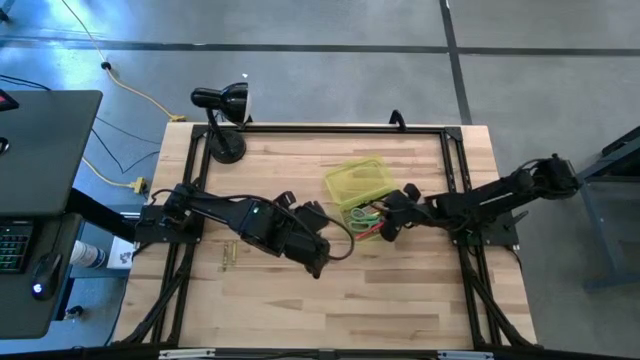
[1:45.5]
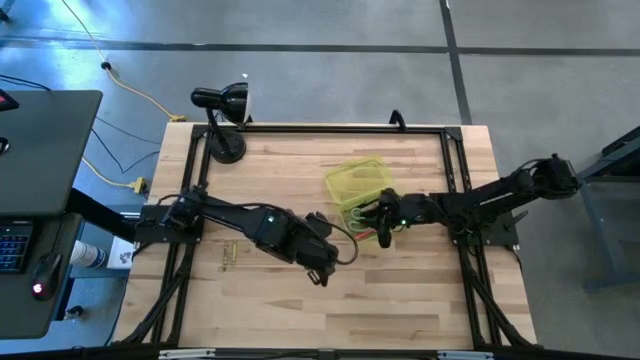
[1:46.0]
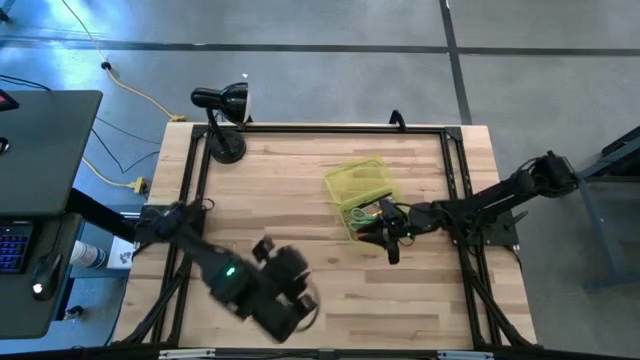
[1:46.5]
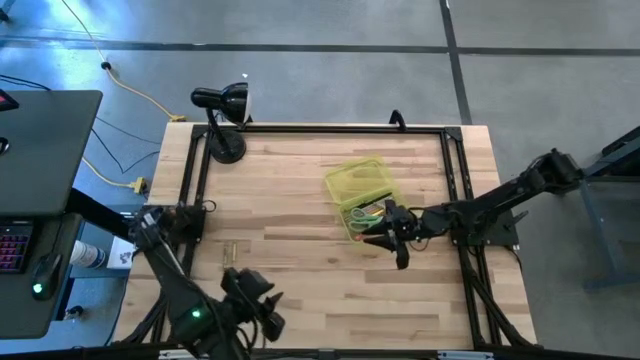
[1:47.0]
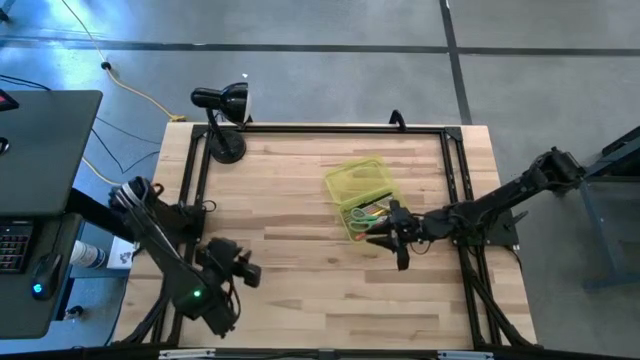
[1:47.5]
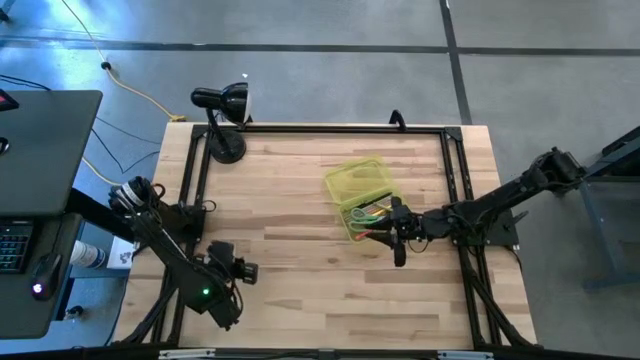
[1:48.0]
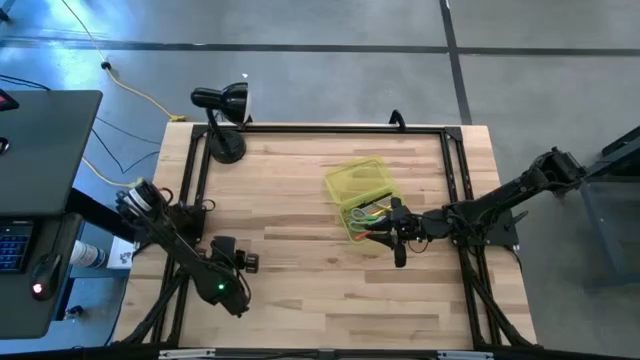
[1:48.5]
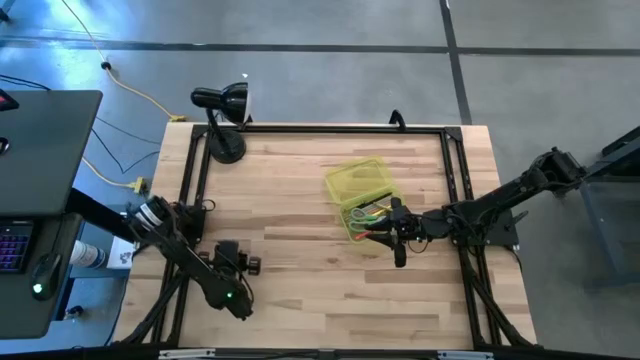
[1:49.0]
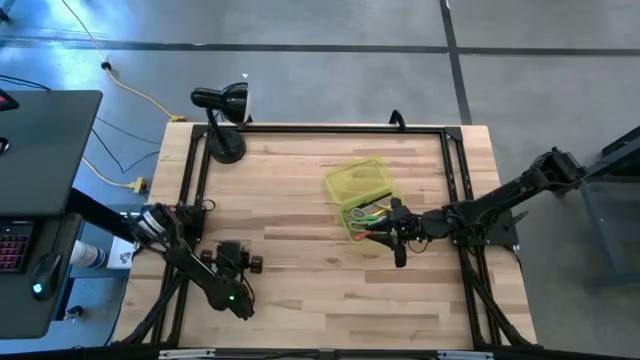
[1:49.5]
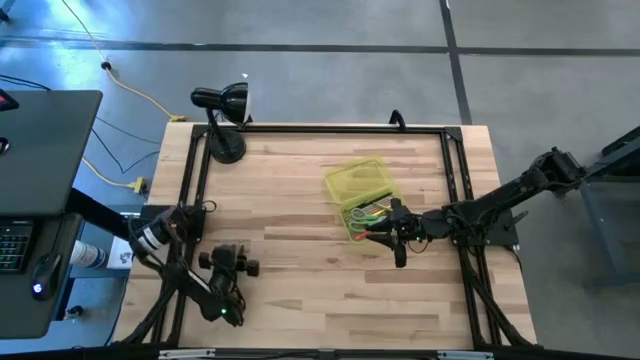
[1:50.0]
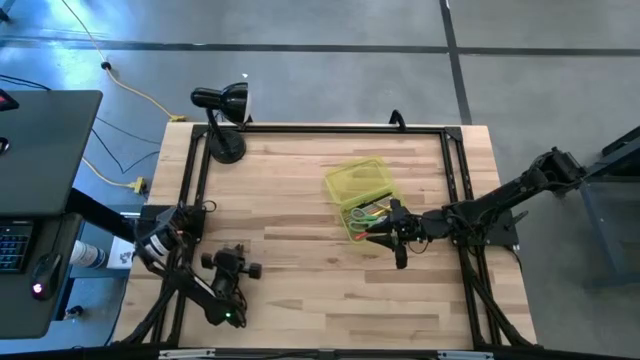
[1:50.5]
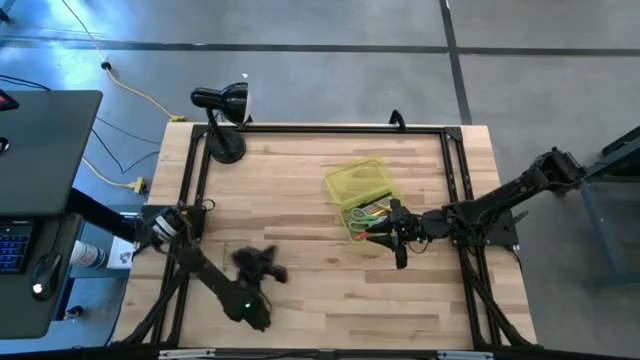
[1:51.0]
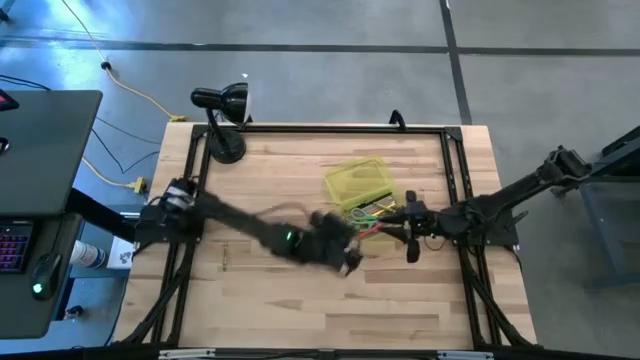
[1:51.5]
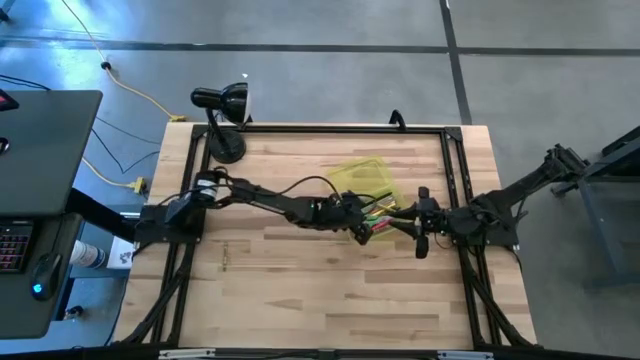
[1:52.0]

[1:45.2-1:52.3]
Task: Pick & place school supplies into a supply box
Put the green crayon into the yellow supply box

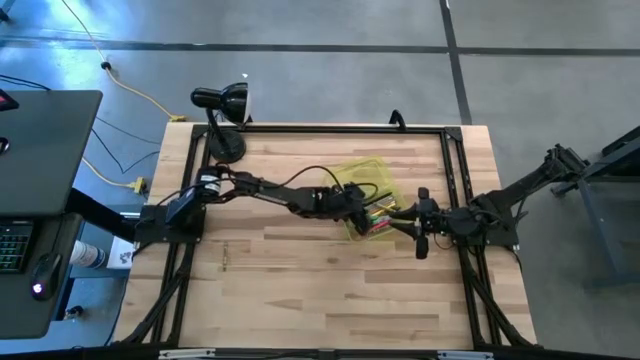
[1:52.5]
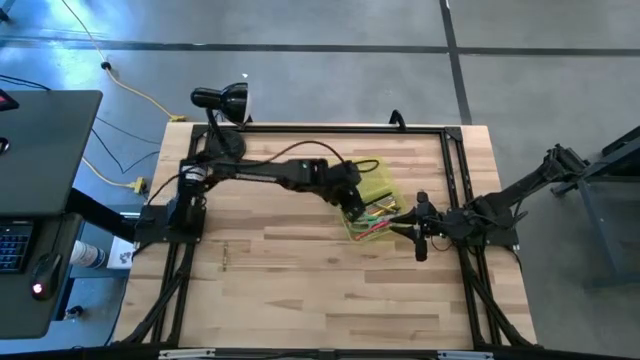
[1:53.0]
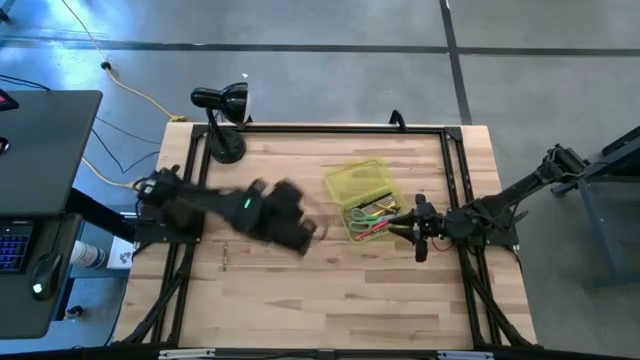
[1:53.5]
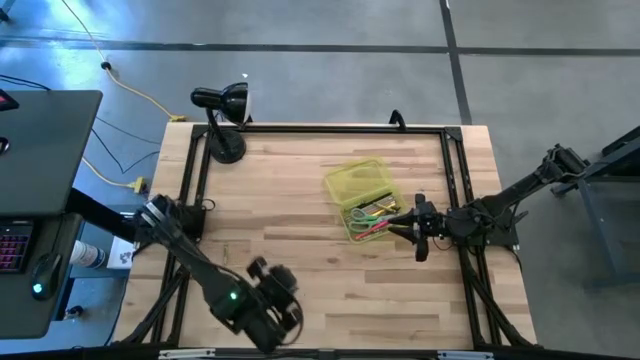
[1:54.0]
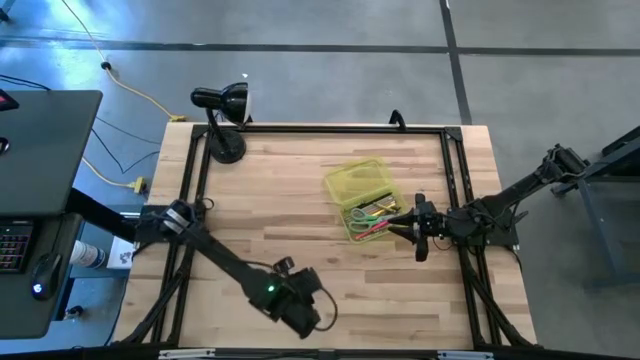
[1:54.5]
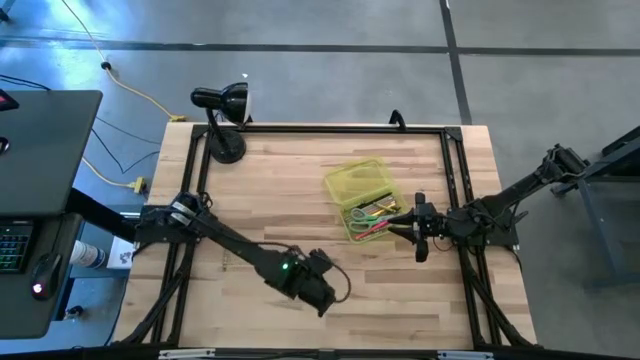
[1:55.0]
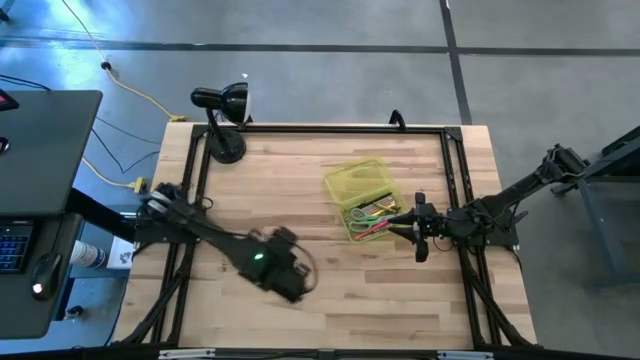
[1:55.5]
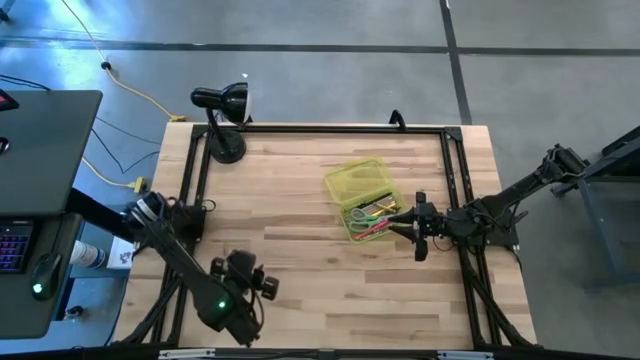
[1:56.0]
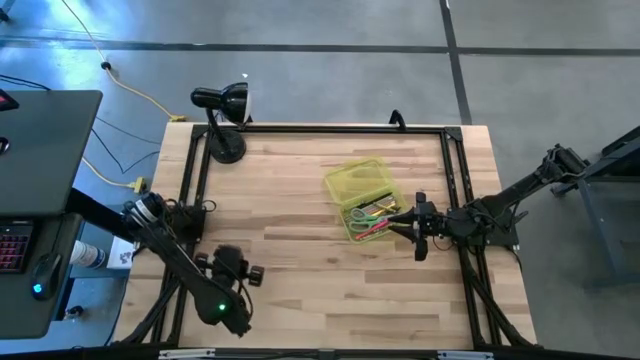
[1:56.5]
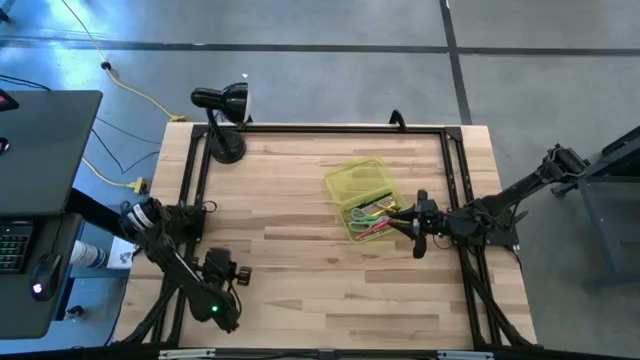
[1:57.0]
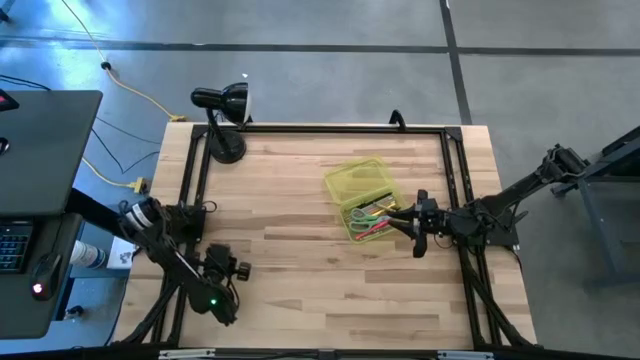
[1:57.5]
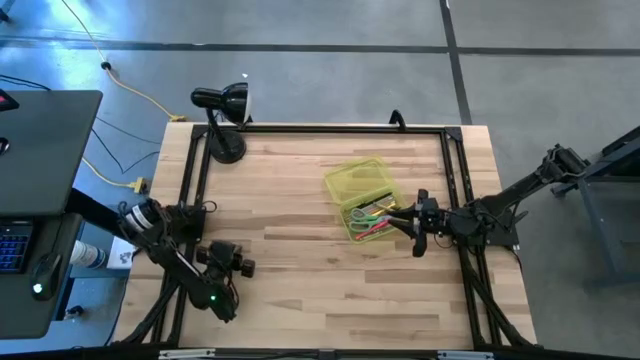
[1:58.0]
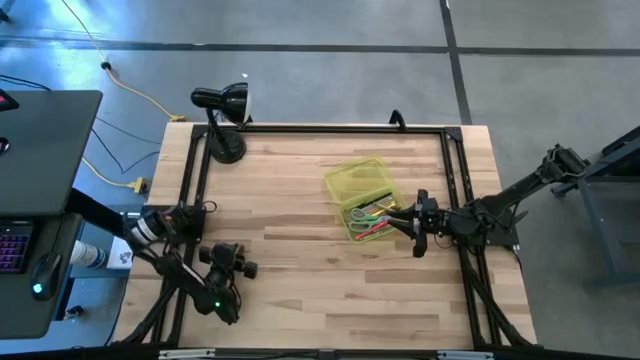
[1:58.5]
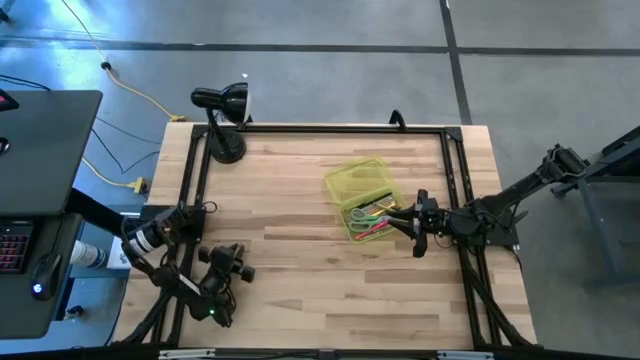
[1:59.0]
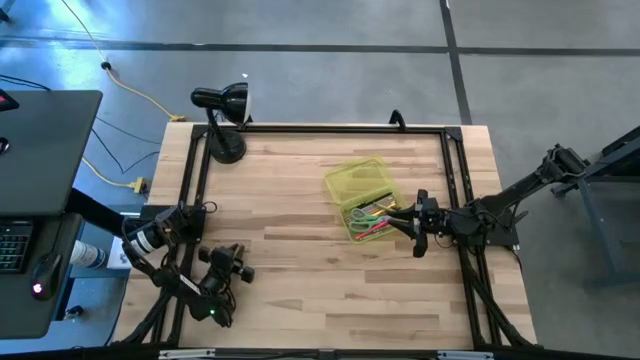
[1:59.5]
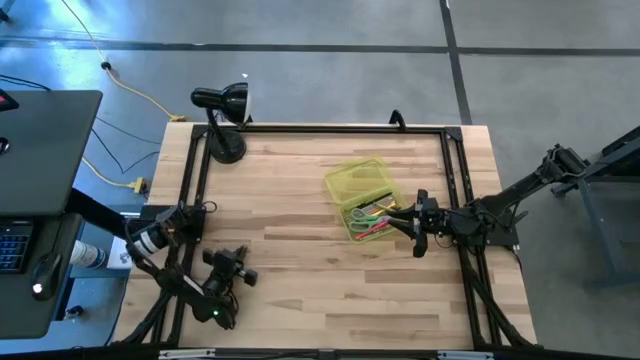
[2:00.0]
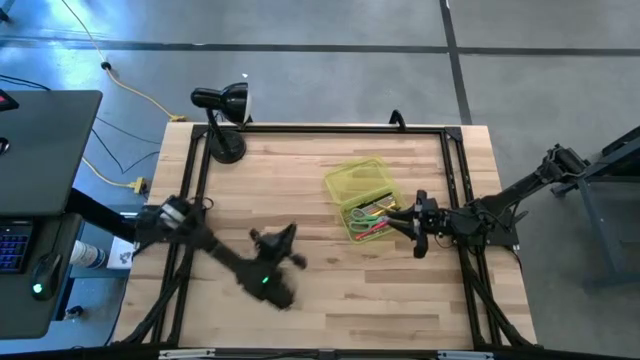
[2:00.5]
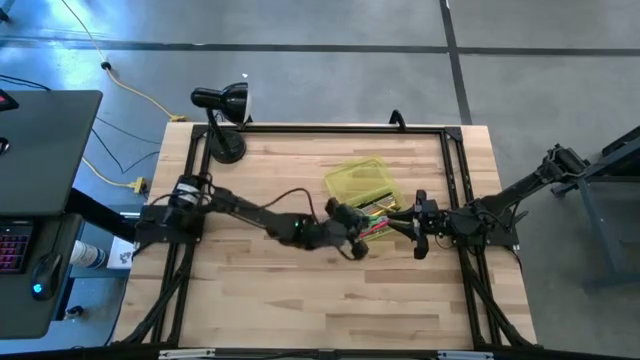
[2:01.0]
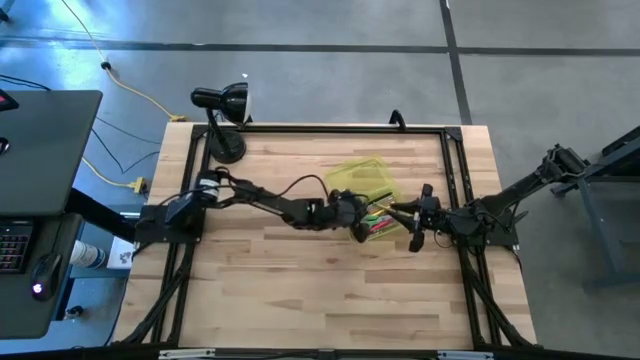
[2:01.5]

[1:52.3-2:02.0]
Put the green crayon into the yellow supply box

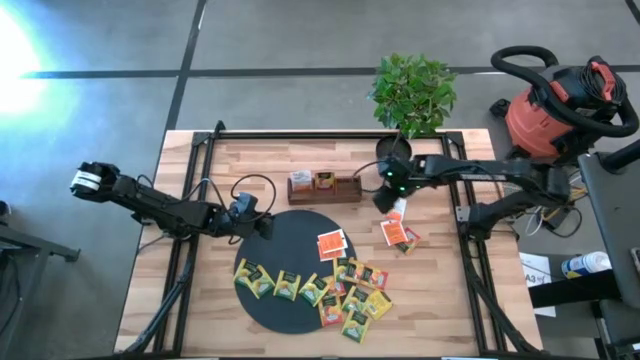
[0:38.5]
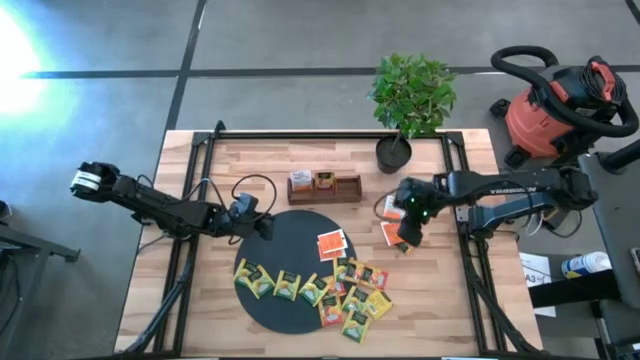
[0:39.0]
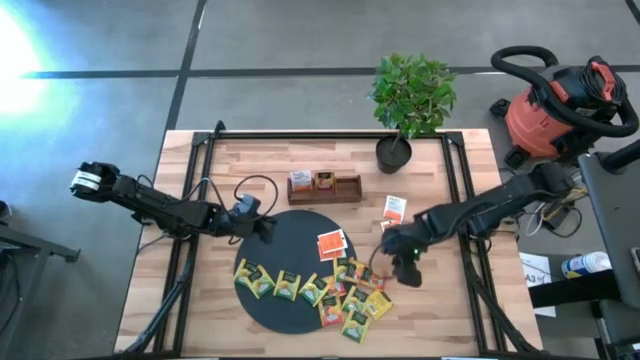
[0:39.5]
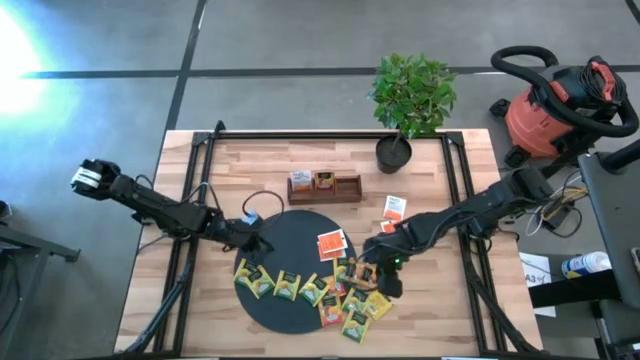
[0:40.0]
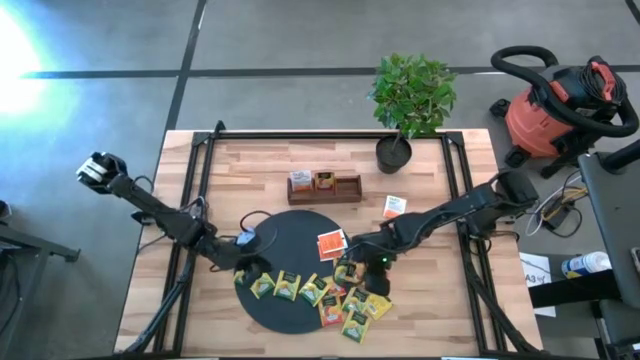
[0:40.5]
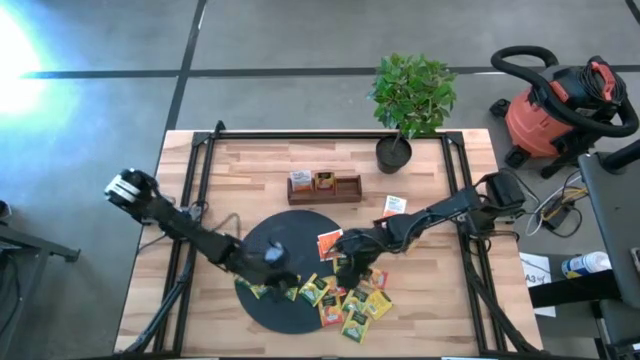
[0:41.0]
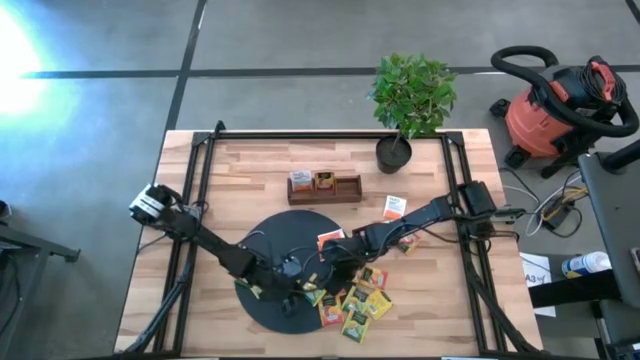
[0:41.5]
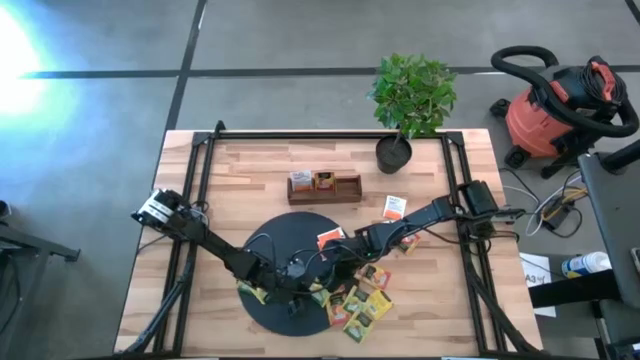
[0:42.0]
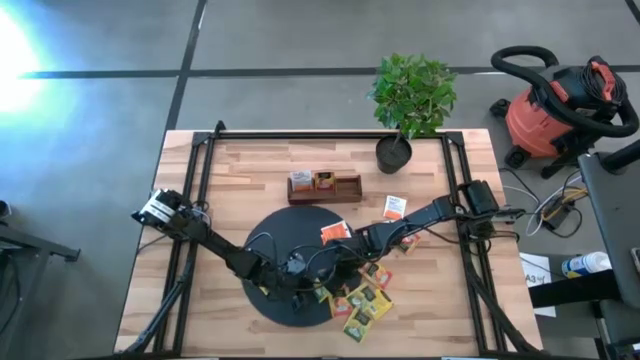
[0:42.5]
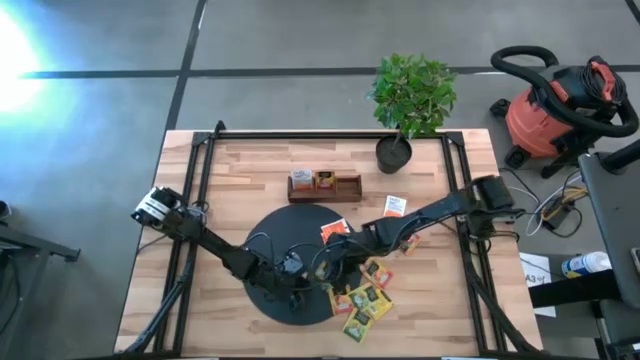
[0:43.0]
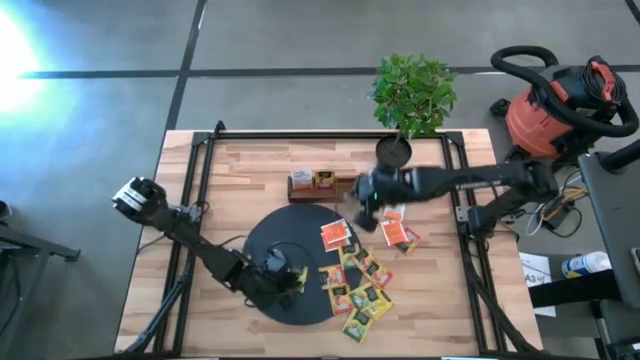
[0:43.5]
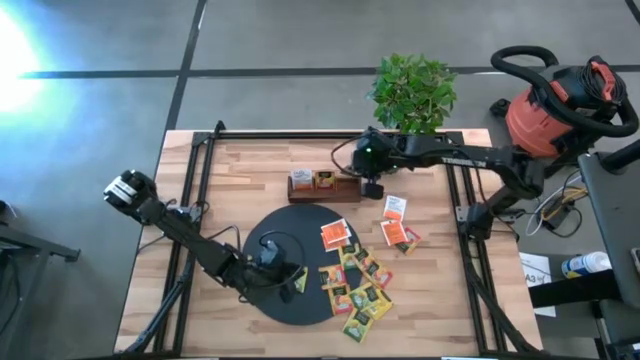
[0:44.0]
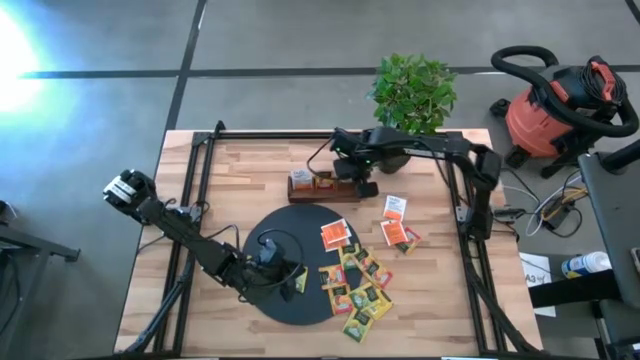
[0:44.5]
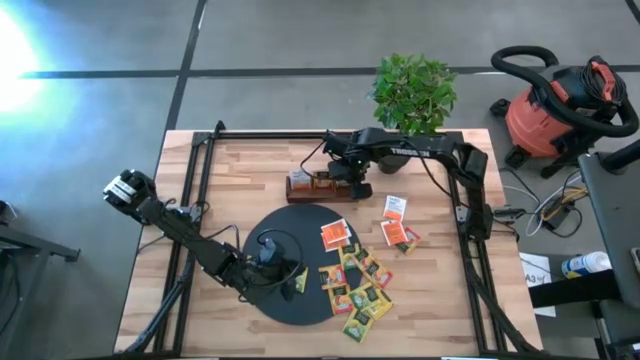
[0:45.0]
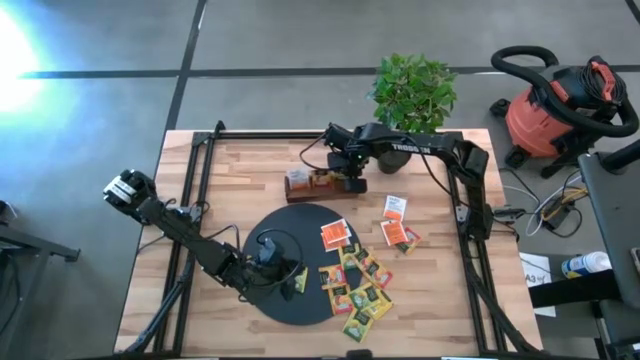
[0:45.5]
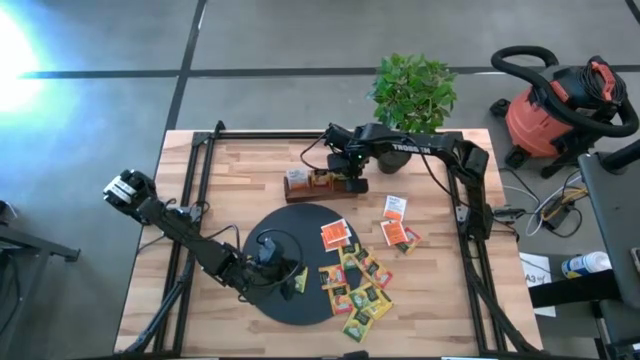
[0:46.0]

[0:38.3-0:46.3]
Task: Pick & Place Tea
Put the yellow tea bag into the right section of the brown wooden organizer
